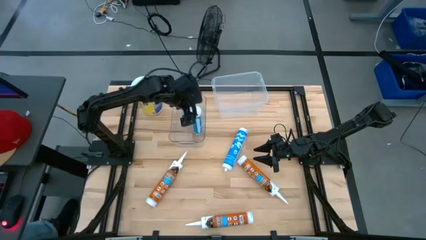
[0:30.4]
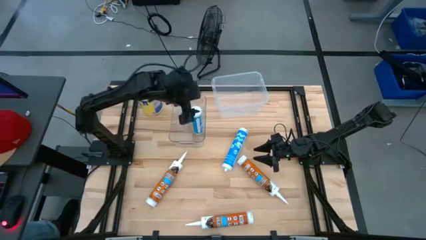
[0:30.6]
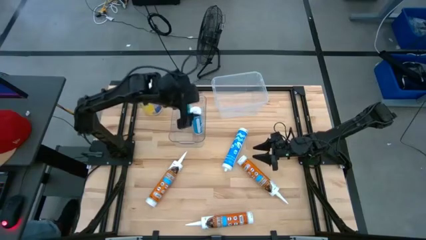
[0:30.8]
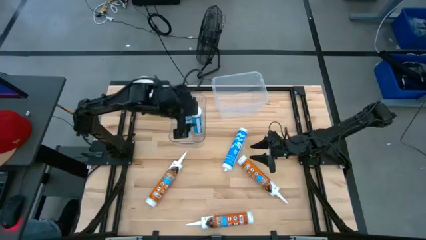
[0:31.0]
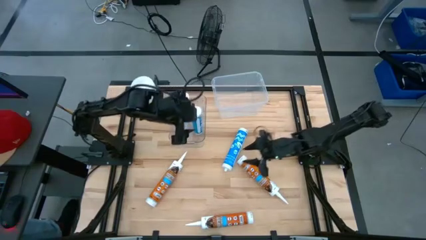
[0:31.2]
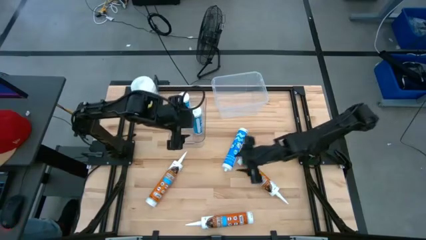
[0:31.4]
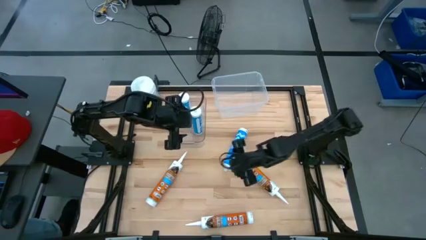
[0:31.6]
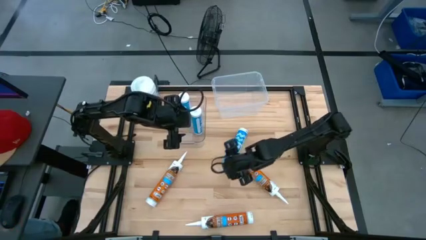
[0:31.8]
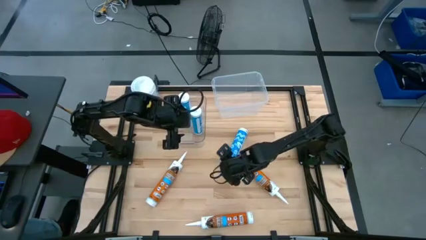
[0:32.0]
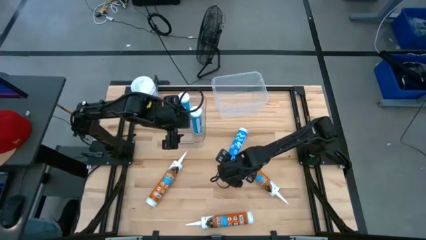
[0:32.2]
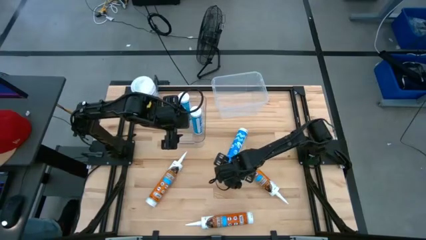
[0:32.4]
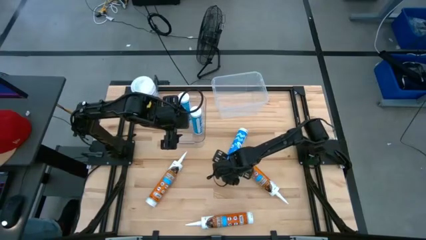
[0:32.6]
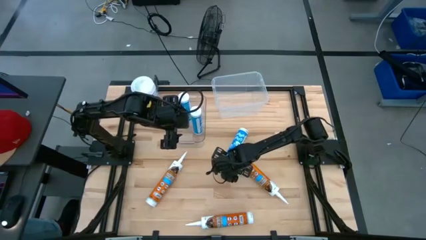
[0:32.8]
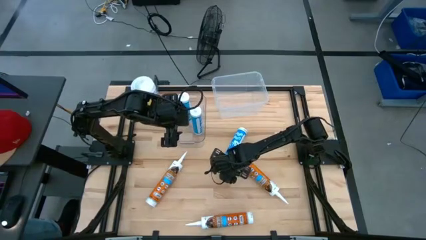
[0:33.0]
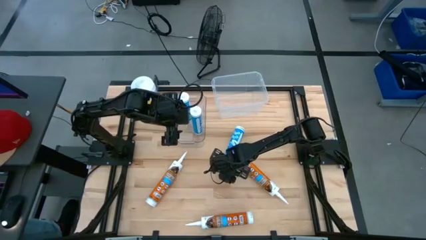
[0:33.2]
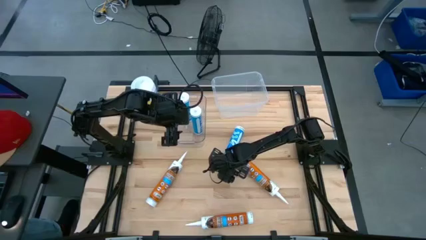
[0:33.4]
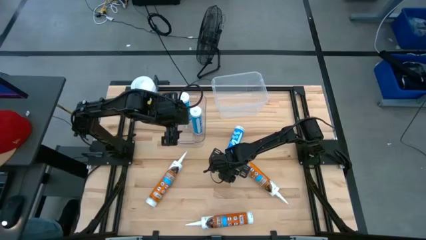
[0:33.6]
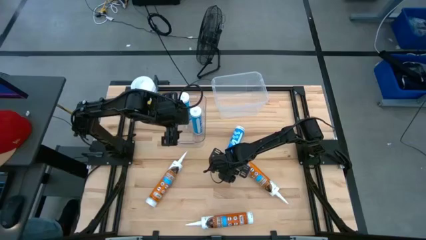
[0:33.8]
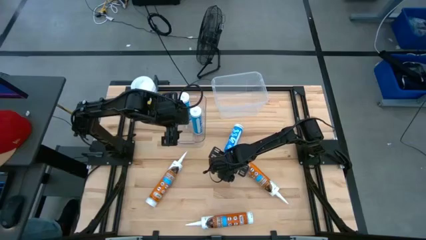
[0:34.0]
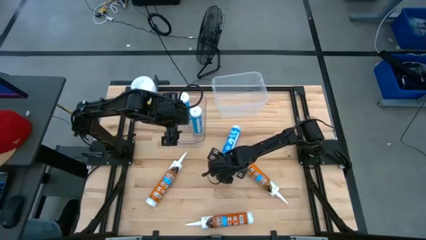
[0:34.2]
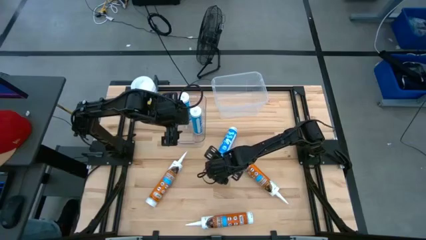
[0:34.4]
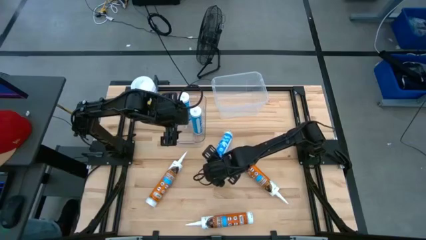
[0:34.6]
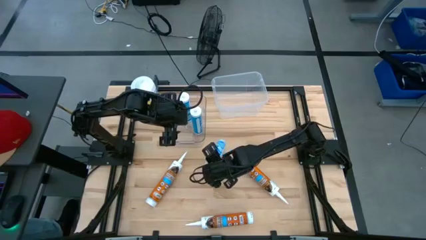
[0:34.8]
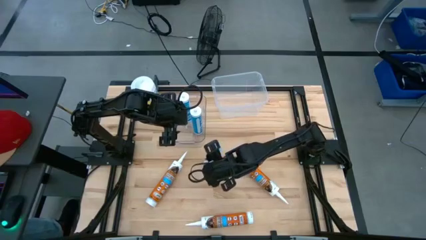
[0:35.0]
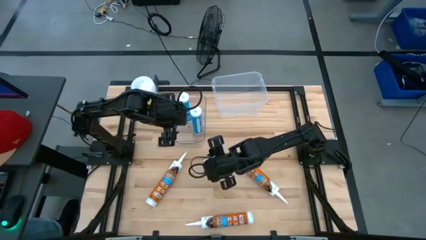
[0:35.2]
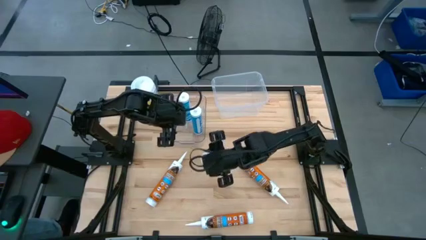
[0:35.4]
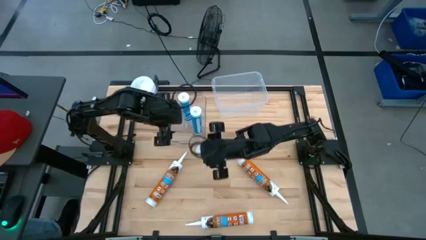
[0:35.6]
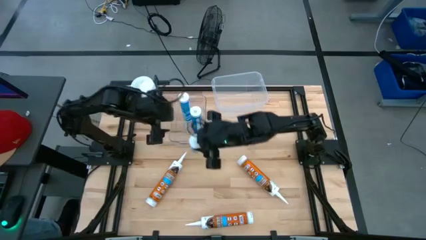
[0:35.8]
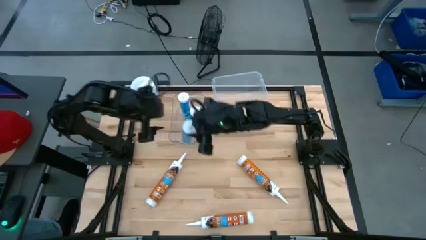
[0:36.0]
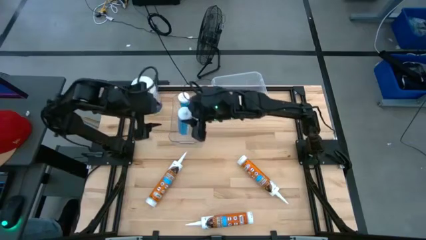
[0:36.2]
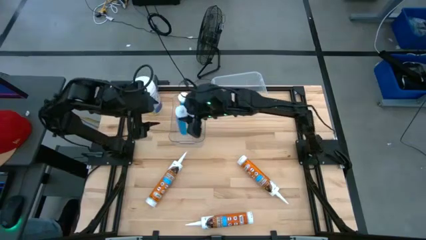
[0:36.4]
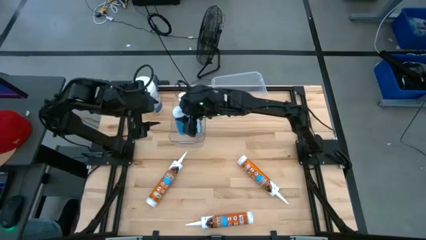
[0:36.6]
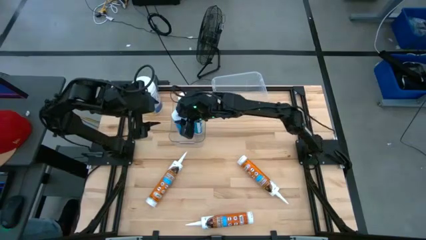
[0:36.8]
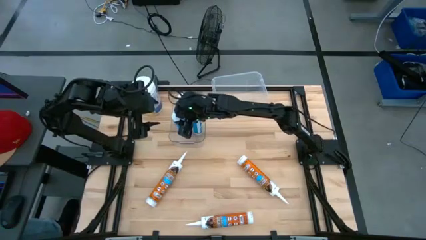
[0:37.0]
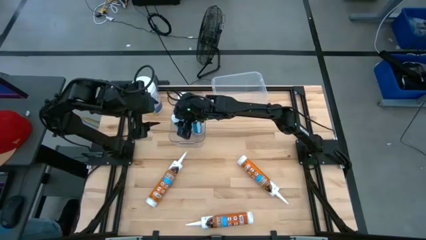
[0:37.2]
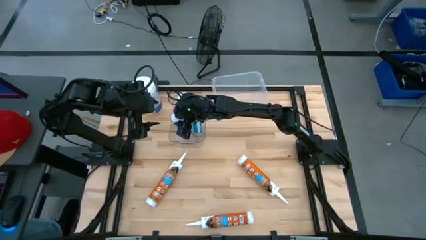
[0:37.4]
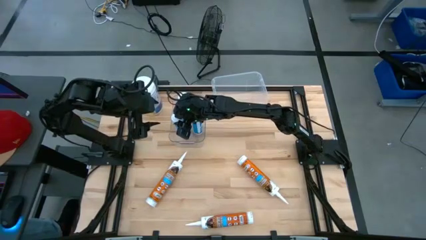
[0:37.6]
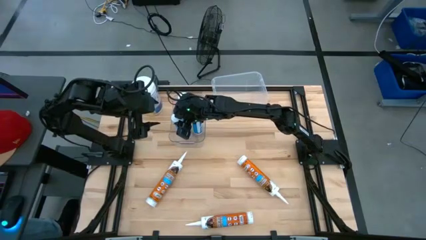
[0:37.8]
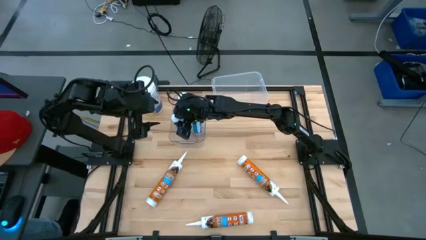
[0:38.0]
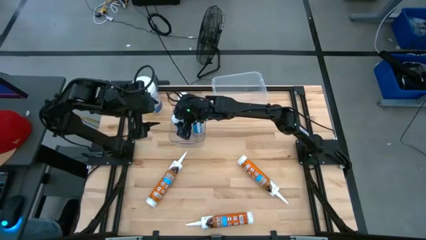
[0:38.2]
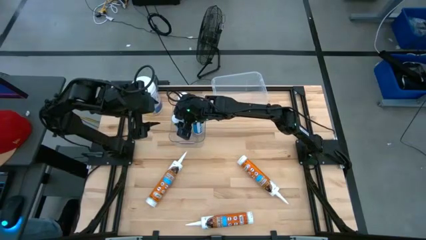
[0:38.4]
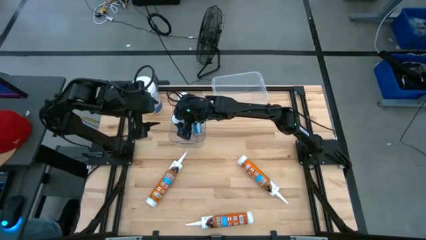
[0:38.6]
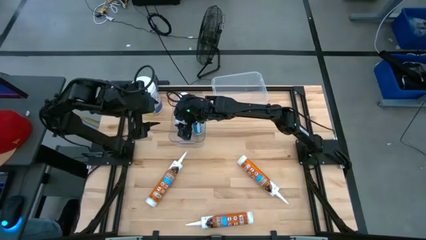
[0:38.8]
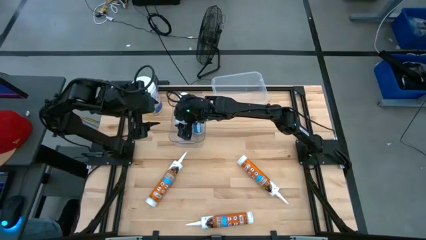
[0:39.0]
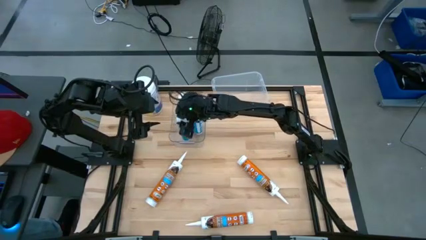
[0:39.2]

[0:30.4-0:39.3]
Task: Pick & place silicon tubes, Sealant and Lysol wipes
Put the blue sealant into the transparent bin

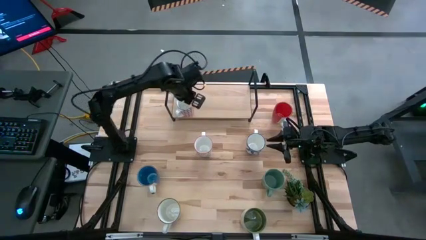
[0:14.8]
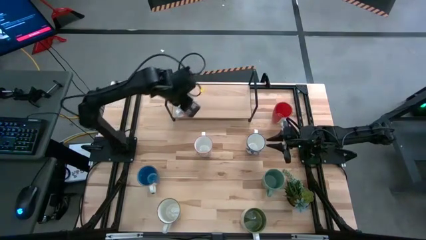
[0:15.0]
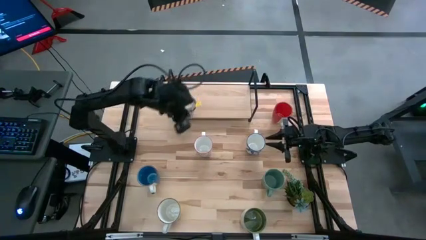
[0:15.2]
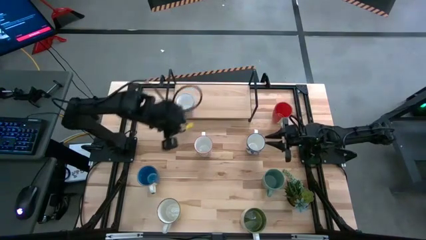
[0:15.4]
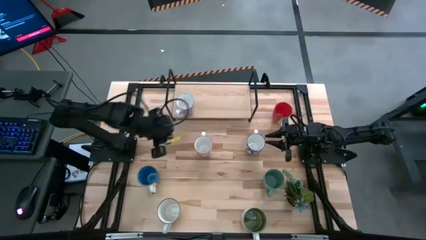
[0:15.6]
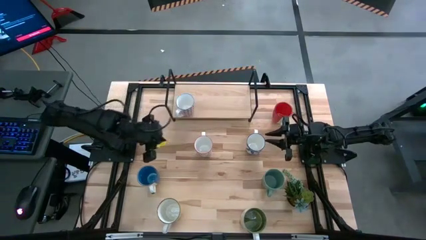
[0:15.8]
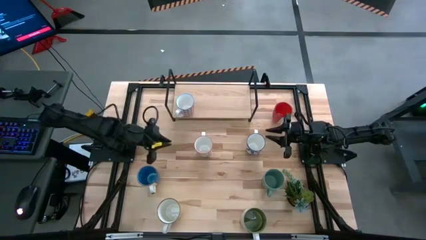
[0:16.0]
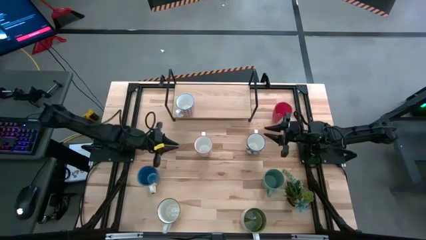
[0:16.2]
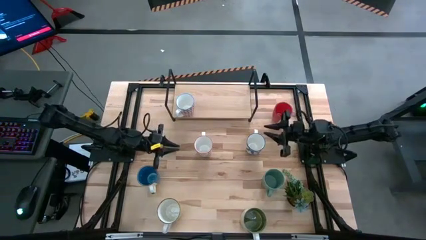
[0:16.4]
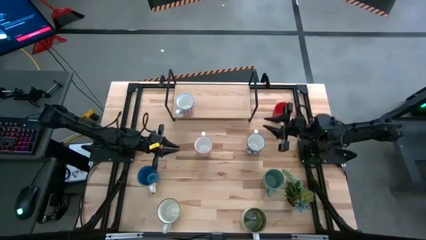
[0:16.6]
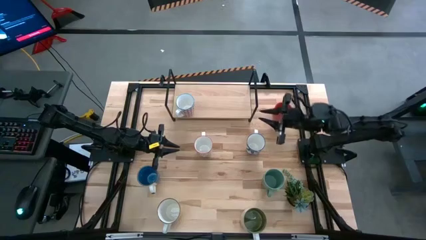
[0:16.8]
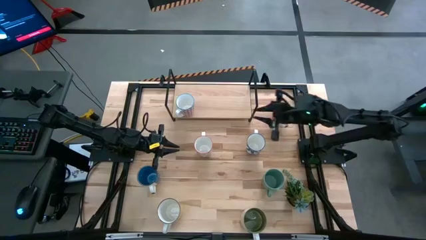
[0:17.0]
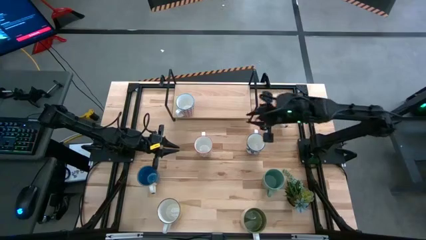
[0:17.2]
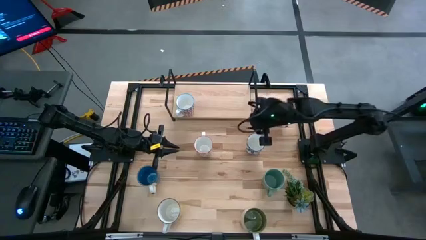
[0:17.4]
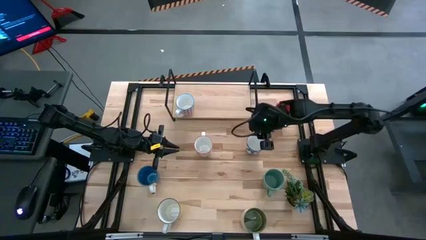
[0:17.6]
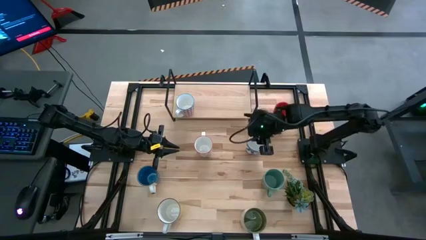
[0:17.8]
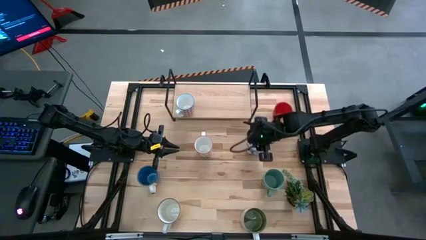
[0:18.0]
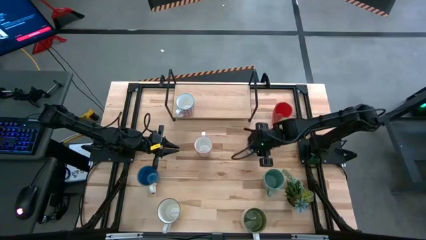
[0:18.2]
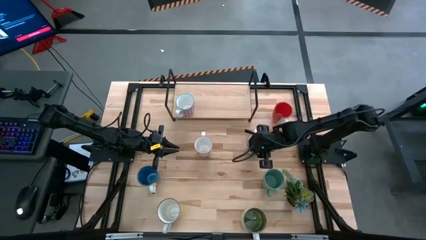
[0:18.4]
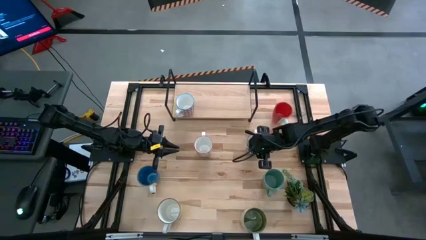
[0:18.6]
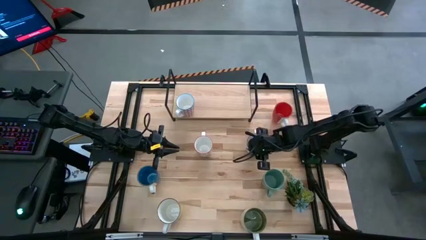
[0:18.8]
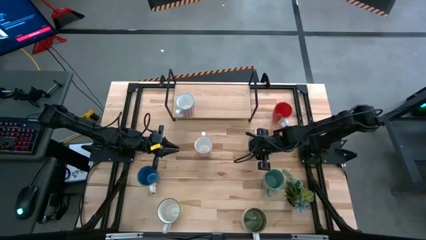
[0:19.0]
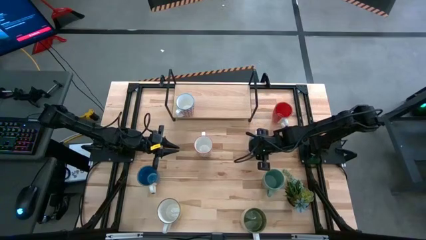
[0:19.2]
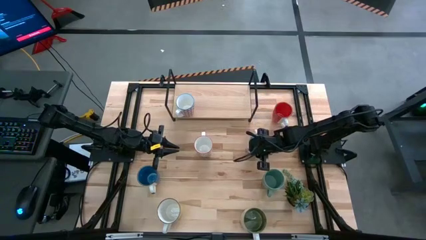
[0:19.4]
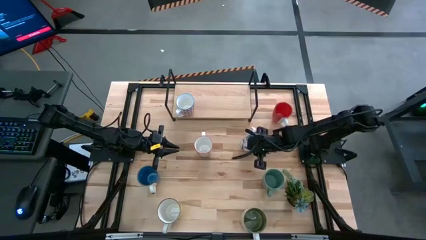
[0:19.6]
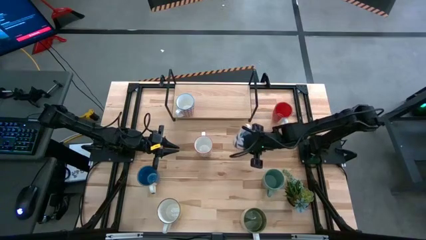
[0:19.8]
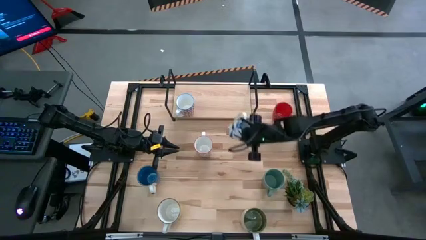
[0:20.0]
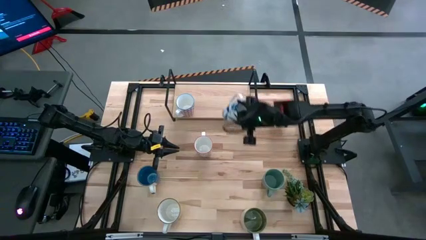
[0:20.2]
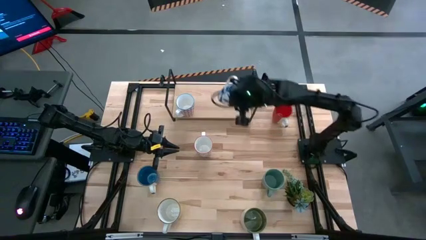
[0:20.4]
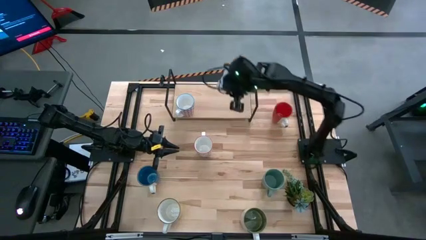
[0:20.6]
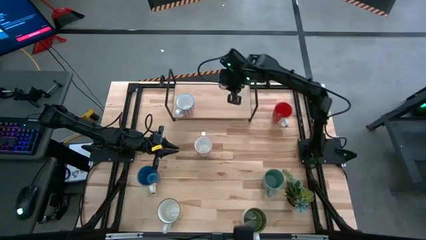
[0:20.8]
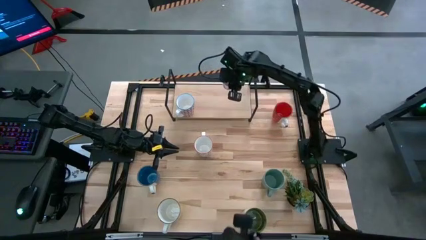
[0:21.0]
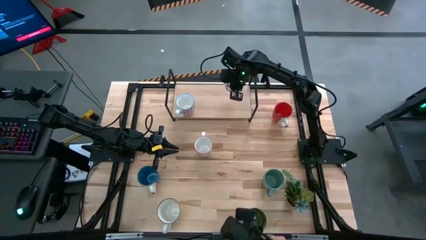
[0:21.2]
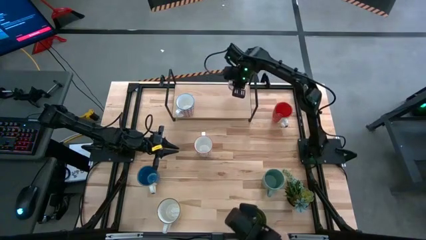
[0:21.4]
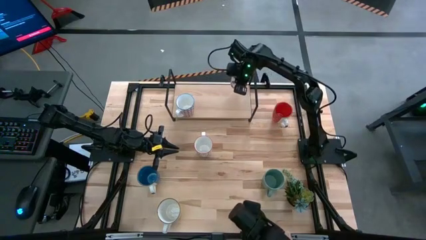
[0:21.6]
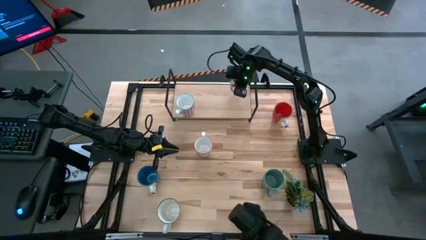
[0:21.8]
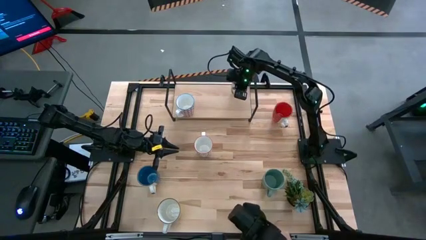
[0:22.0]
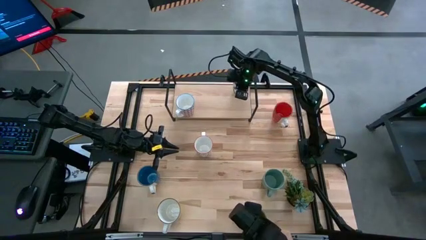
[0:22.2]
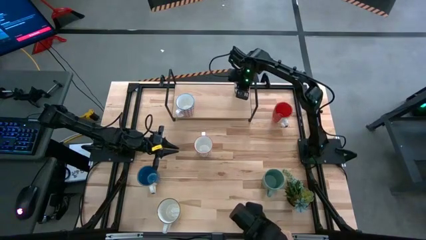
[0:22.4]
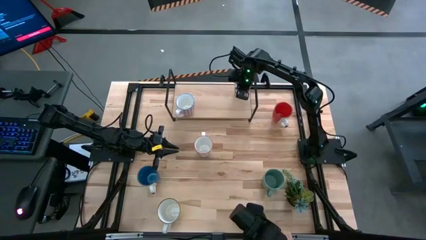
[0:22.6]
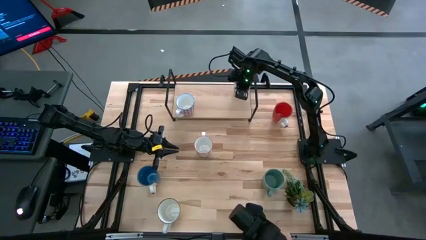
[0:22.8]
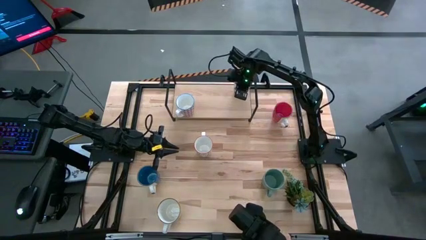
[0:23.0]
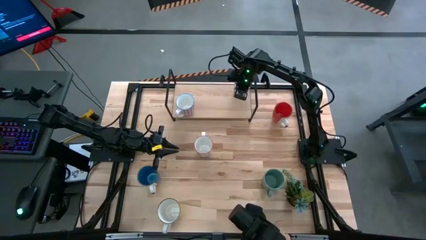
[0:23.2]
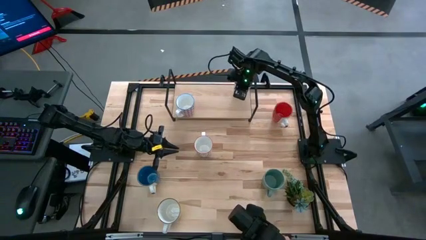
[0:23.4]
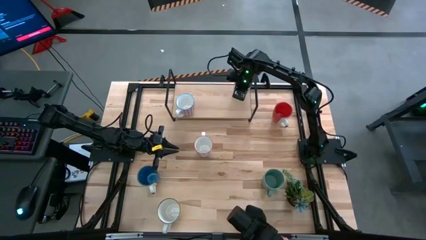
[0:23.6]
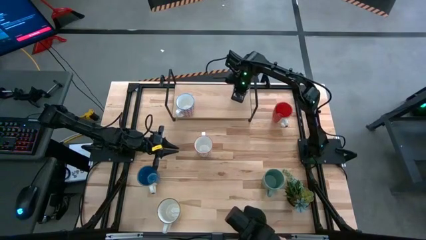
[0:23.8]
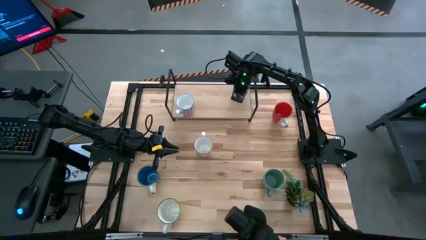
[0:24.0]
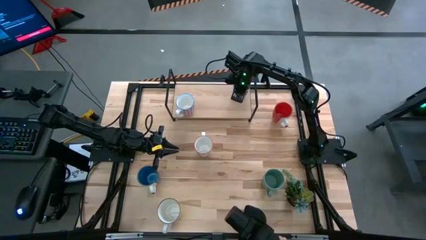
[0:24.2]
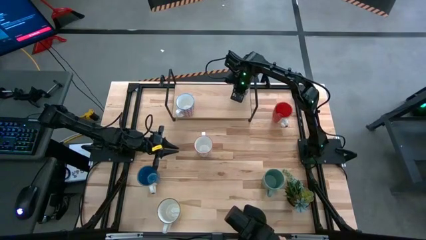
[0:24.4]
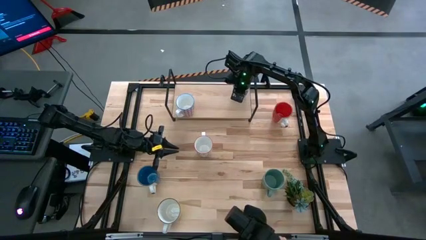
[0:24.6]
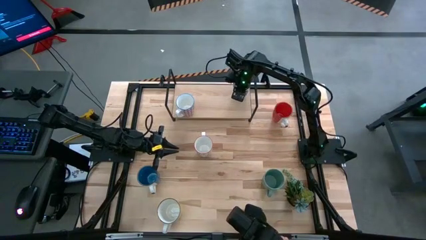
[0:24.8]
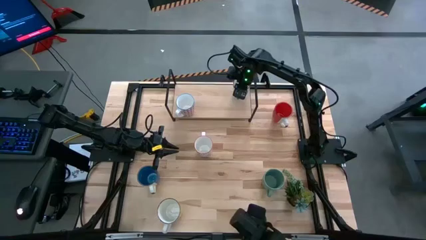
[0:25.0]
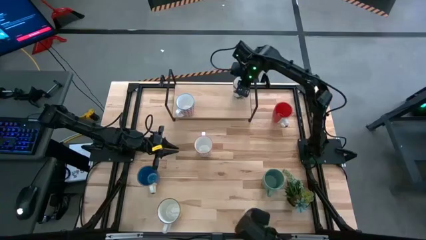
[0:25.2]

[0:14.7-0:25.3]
Task: Place coffee mugs
Put the blue patterned mug on the shelf
